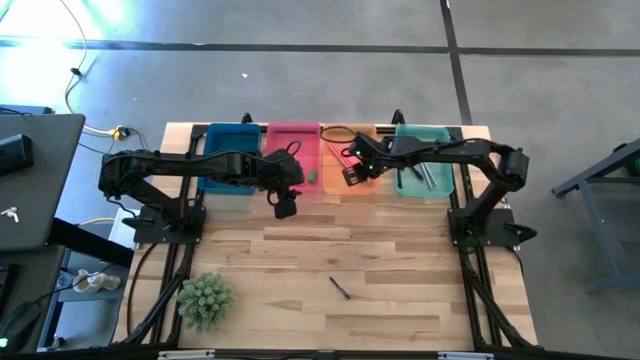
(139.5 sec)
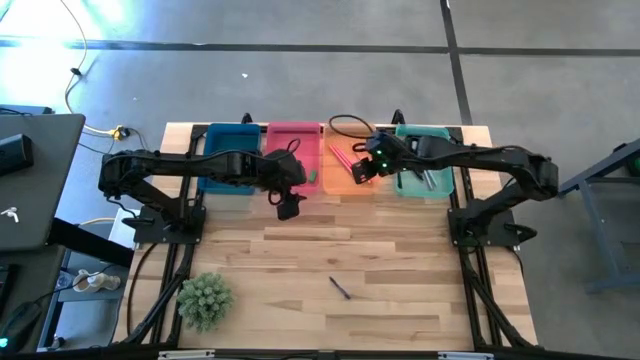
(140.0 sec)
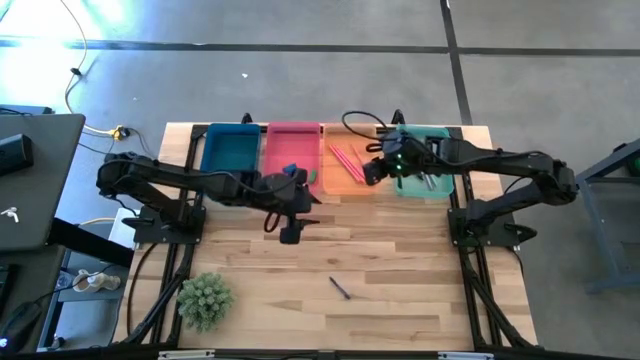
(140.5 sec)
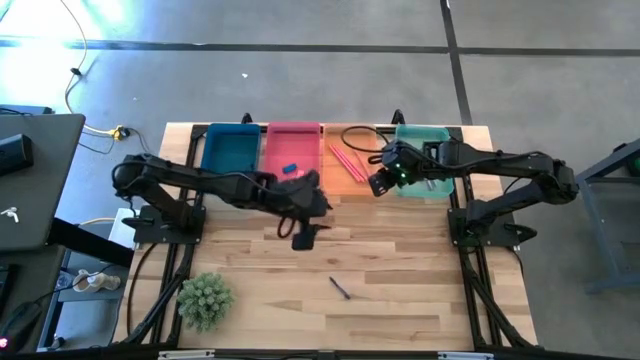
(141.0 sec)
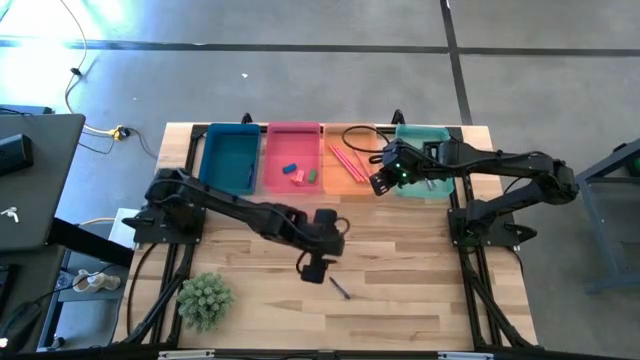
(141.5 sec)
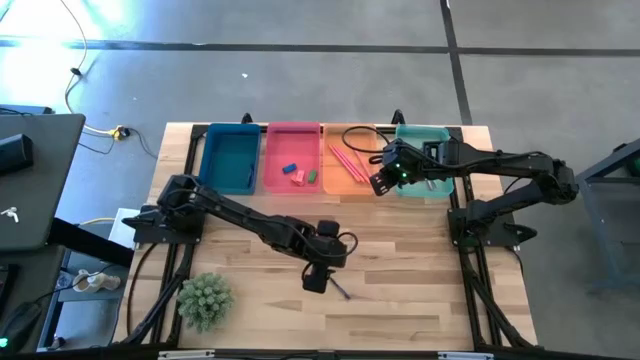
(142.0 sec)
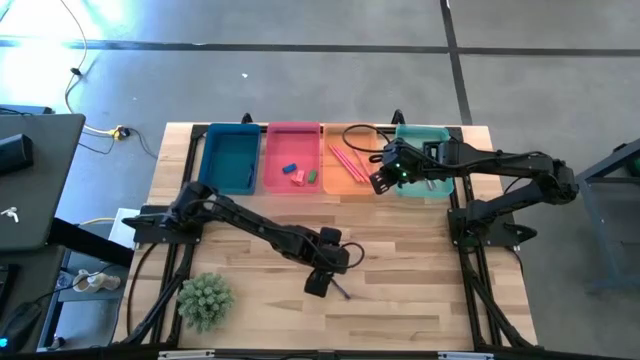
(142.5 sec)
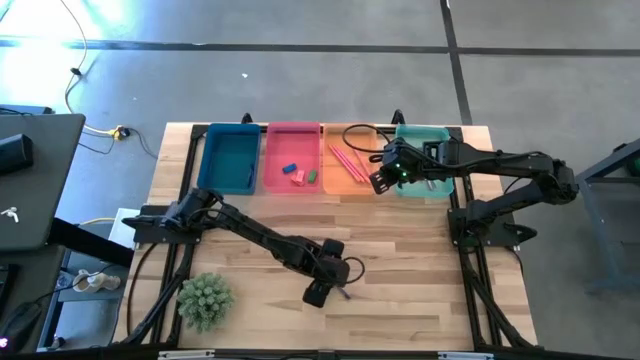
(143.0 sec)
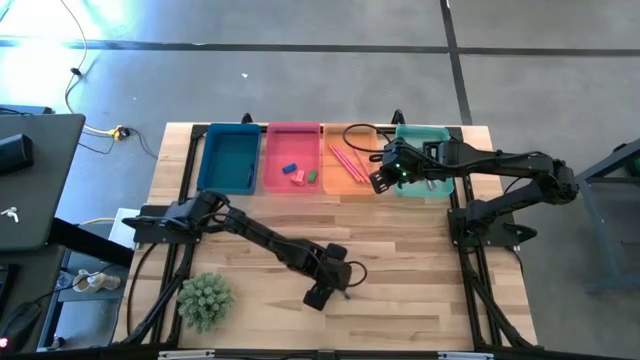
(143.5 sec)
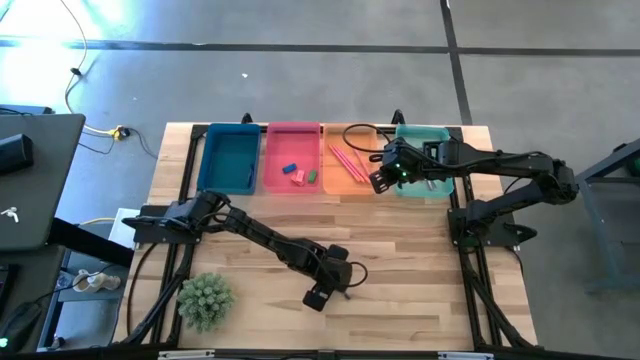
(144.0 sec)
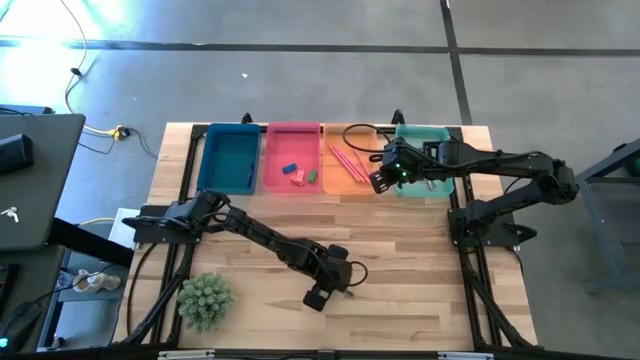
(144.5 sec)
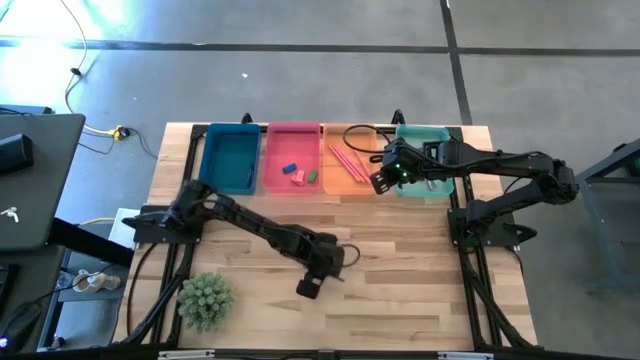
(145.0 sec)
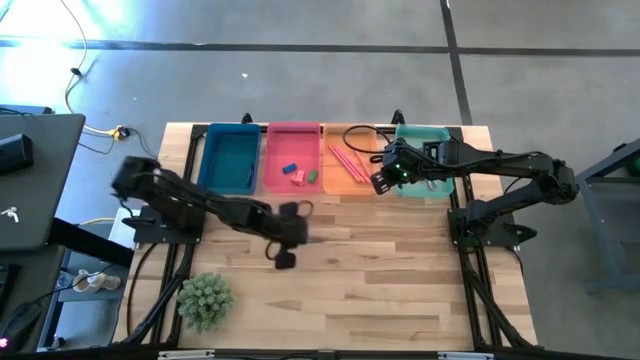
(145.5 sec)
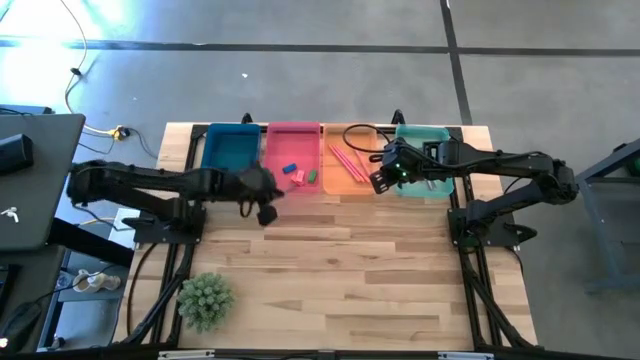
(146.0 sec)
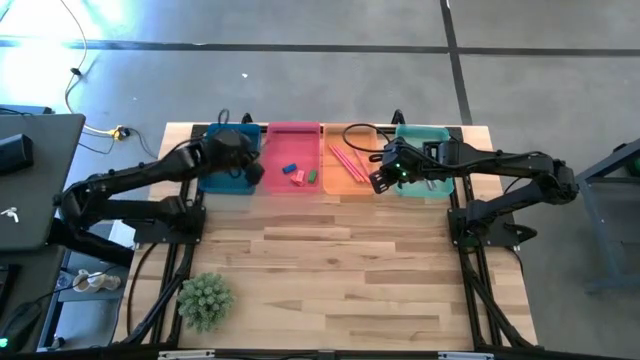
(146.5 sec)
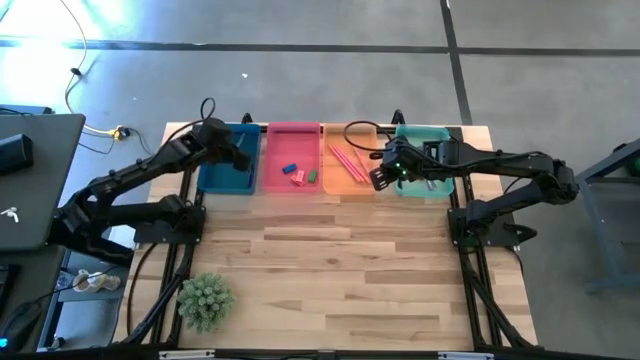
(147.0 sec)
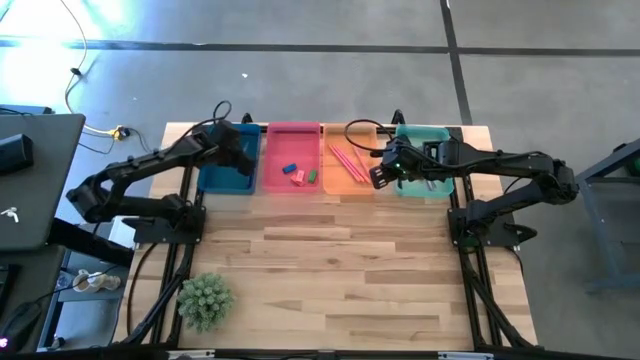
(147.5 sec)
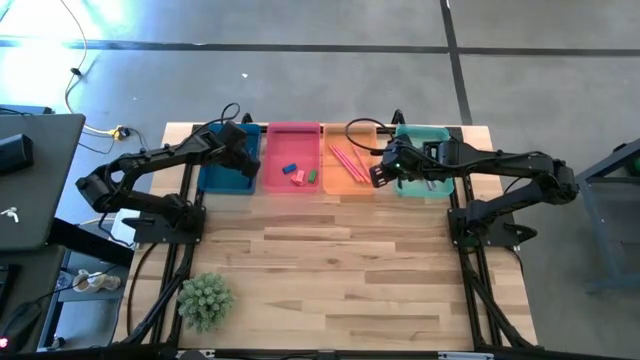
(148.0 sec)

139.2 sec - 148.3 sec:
Task: Sort crayons/erasers/pens/pencils in bins
Put the blue crayon into the blue bin

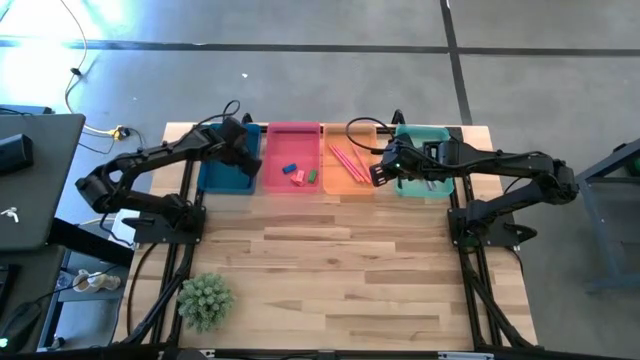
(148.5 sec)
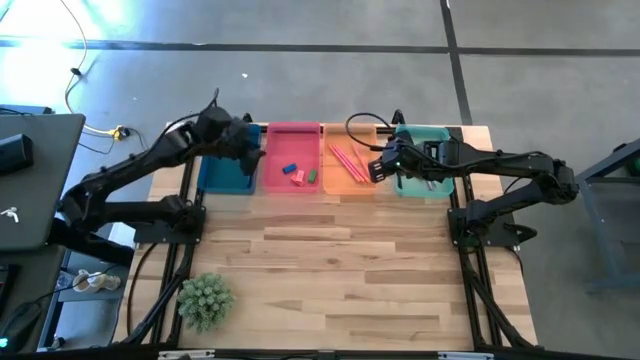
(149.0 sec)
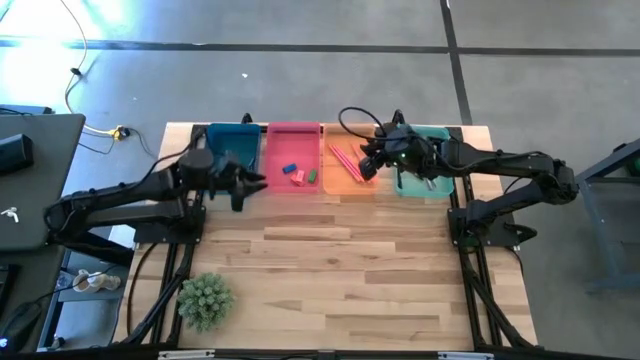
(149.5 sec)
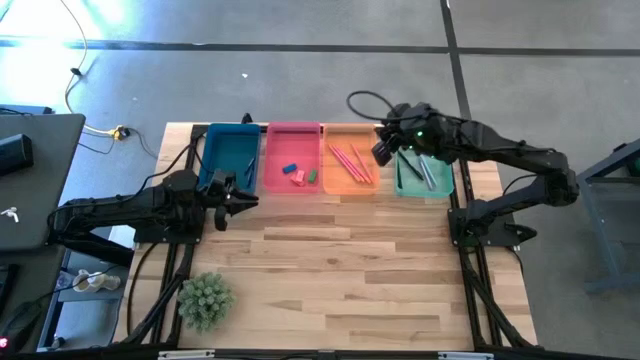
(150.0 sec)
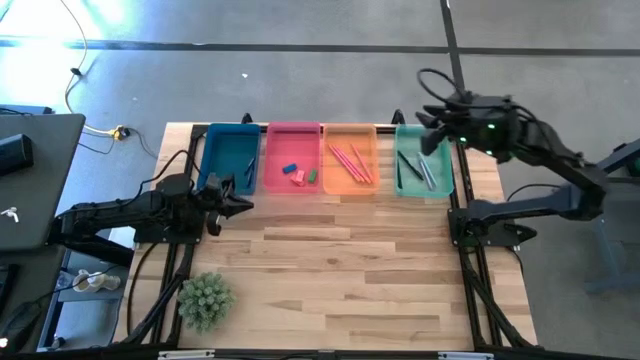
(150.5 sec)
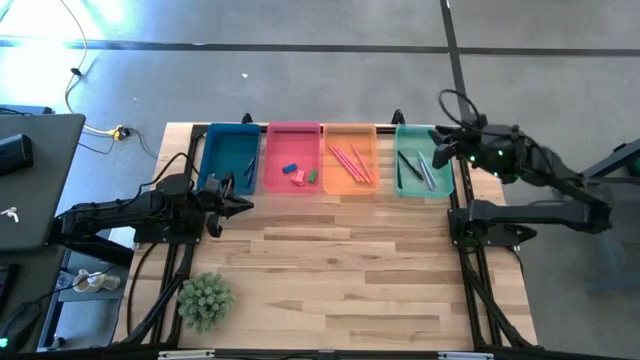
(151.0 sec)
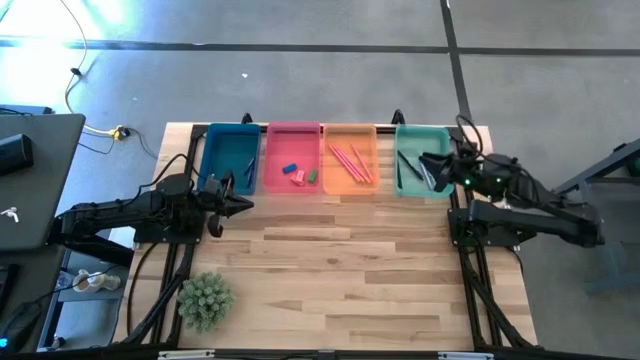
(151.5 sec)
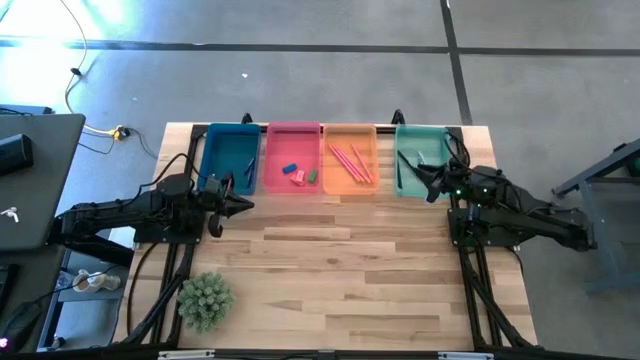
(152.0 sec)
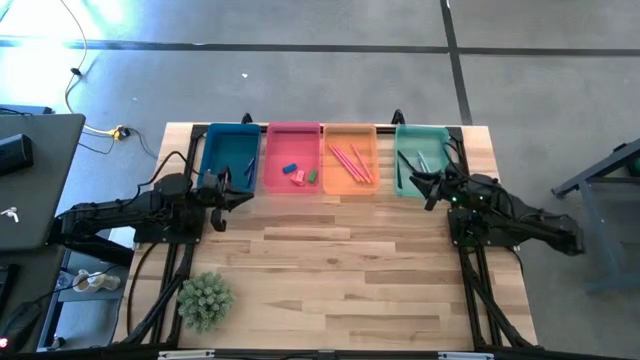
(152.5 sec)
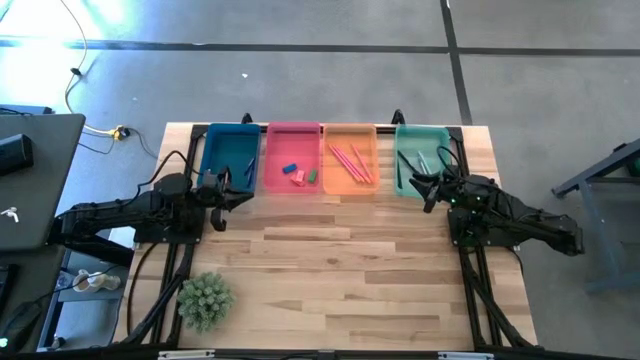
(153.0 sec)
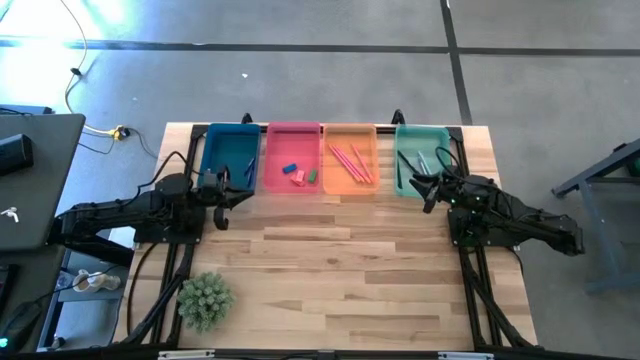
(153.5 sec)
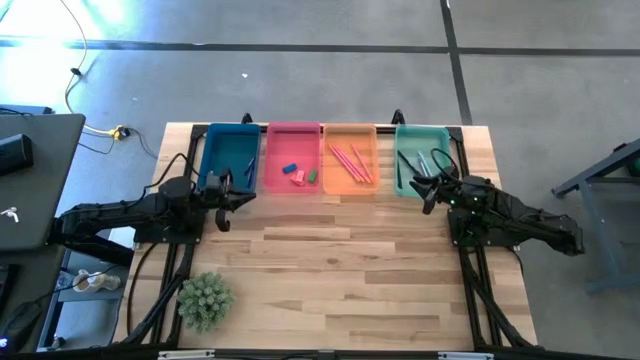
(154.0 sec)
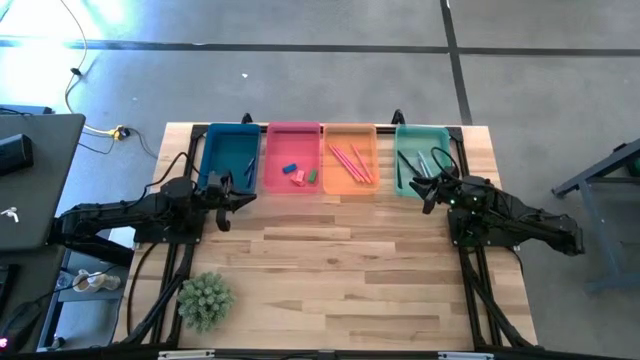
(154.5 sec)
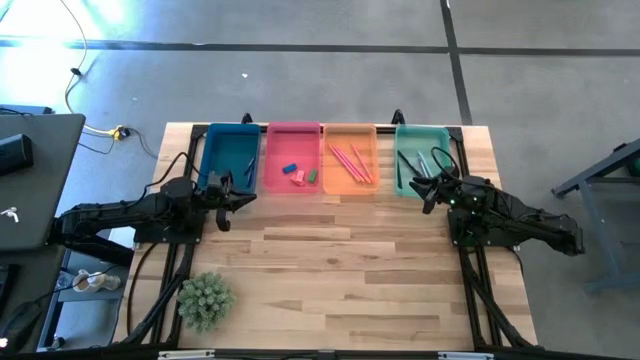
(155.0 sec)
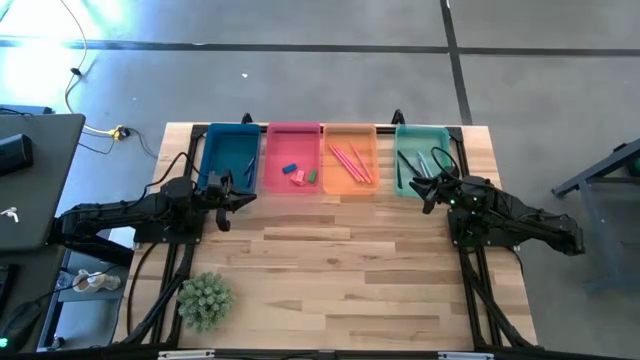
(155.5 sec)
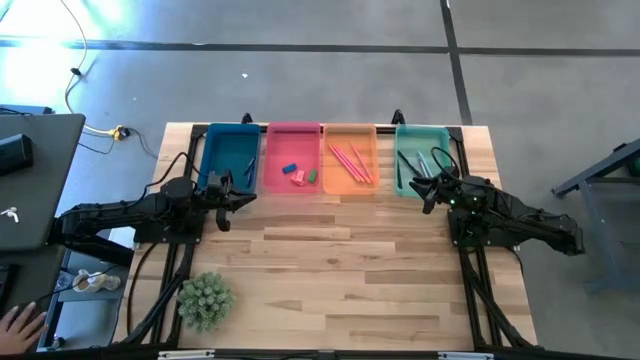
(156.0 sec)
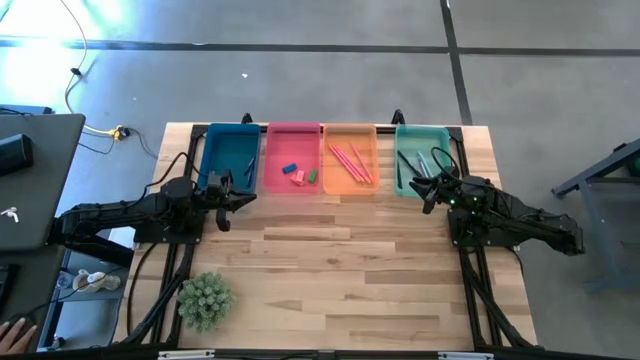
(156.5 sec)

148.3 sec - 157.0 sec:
Return to Home Position

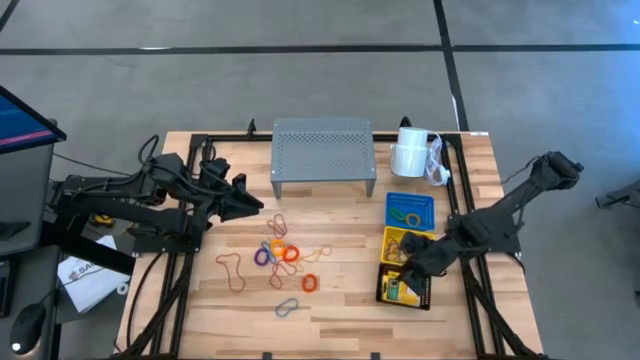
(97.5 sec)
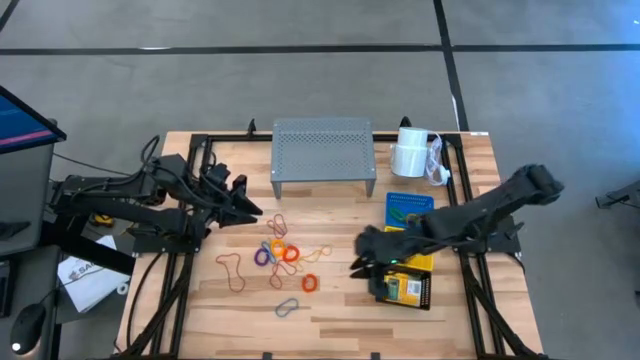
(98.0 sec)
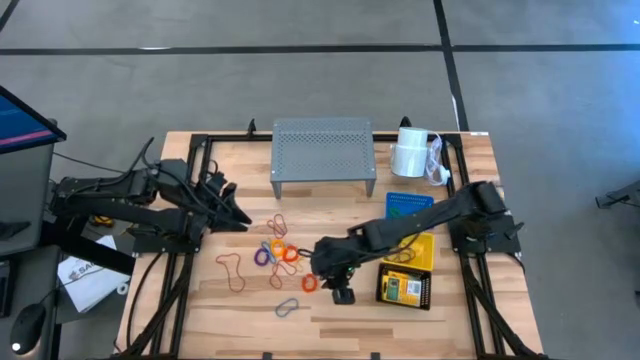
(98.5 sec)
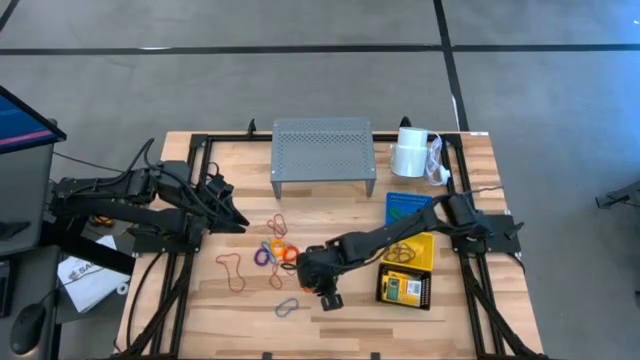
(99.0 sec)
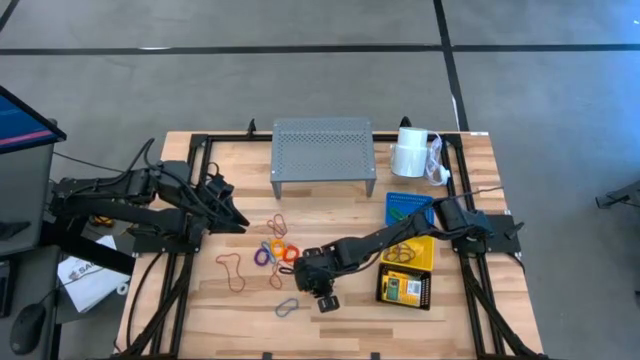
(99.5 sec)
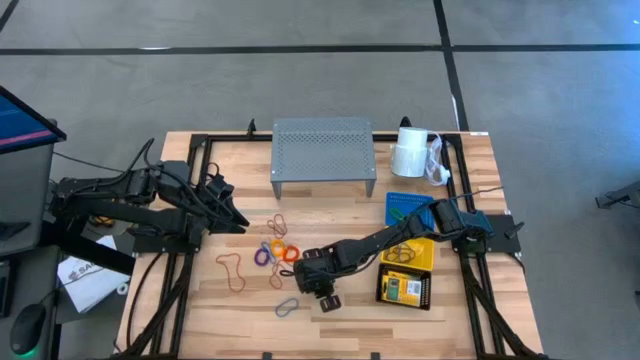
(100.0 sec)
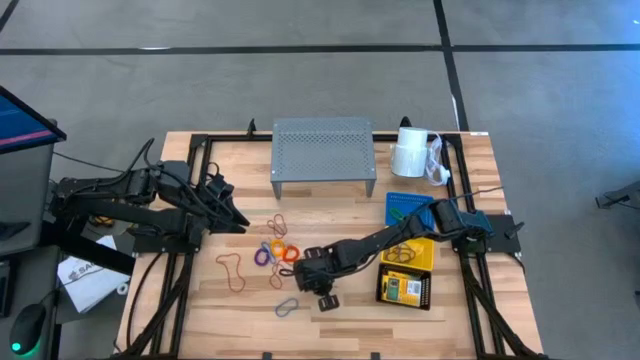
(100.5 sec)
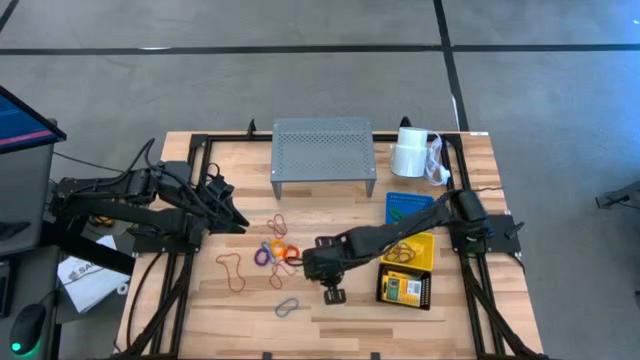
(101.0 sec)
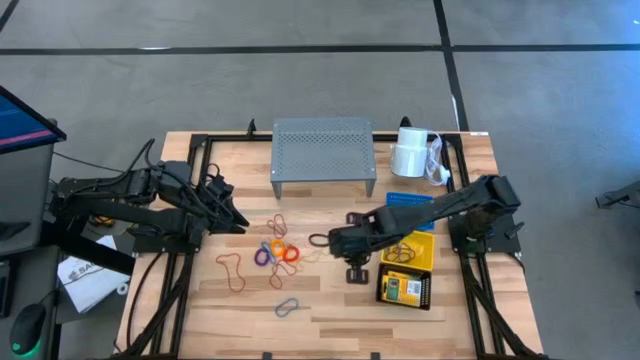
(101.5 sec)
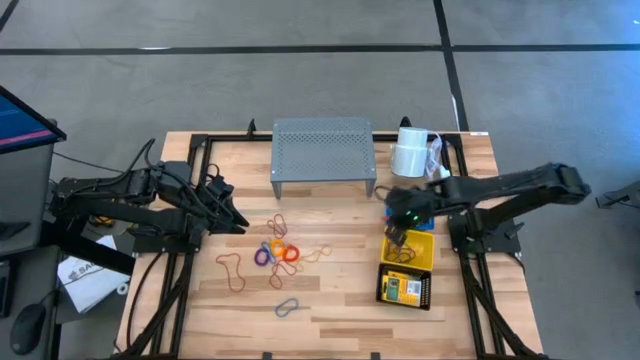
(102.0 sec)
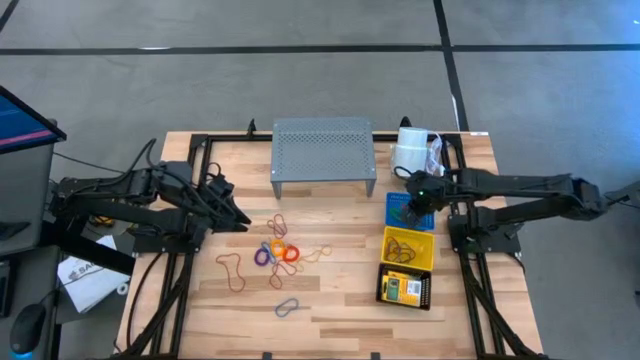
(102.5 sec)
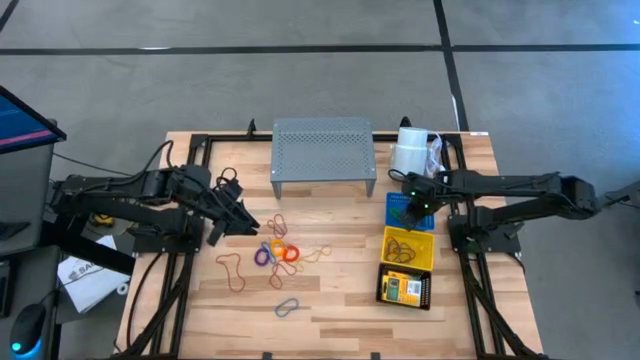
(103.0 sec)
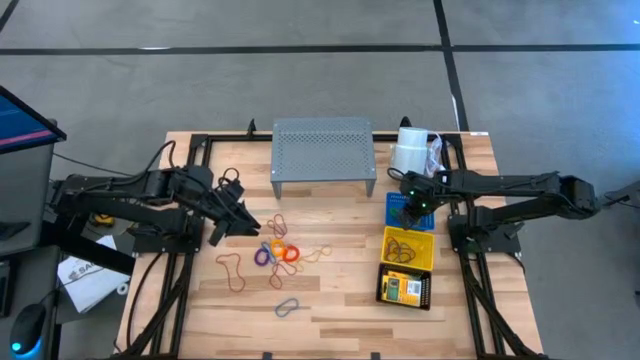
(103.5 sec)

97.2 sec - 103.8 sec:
Task: Pick & Place Office Desk Supplies
Put the orange spring keychain into the blue basket
